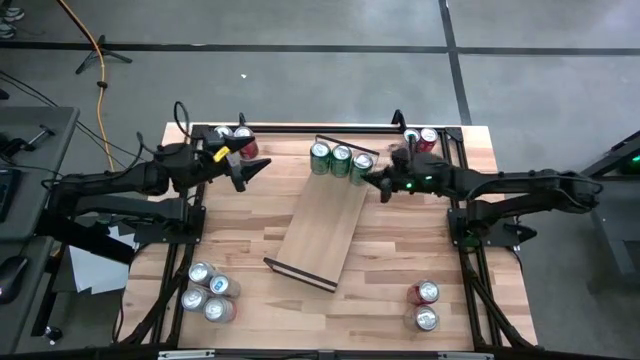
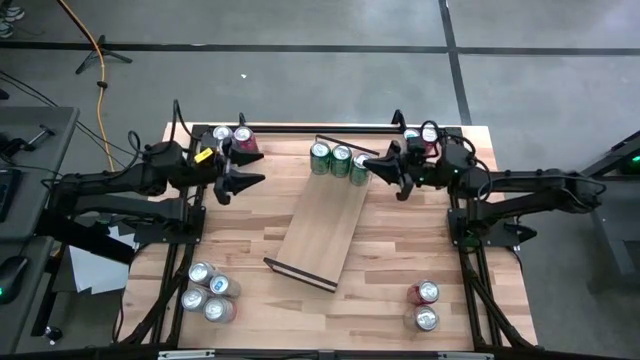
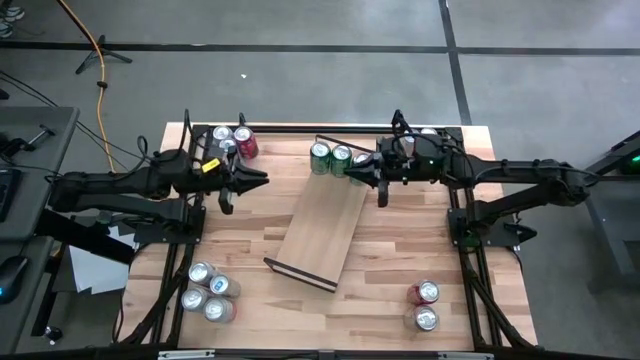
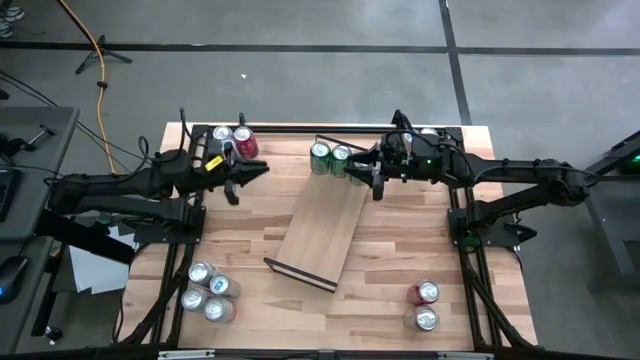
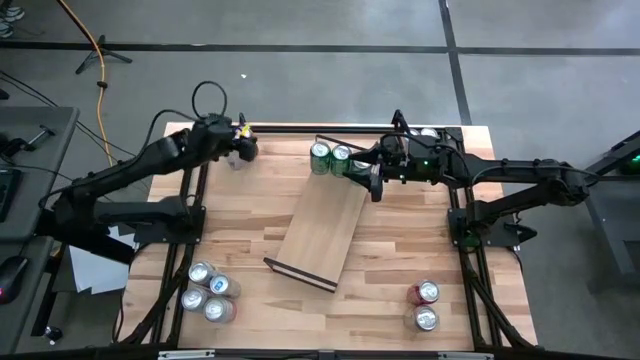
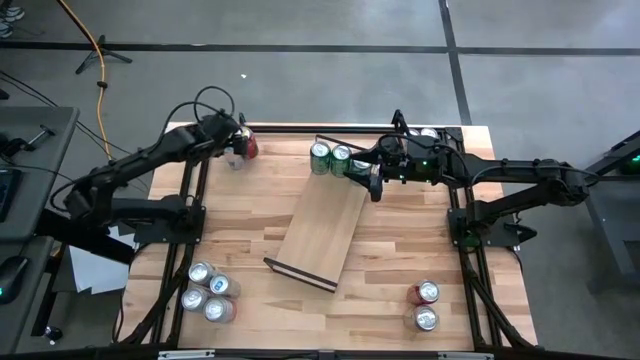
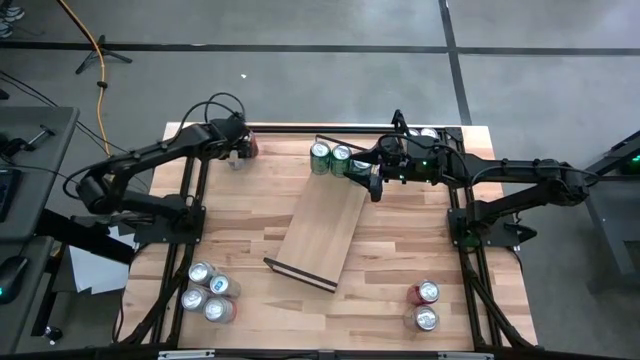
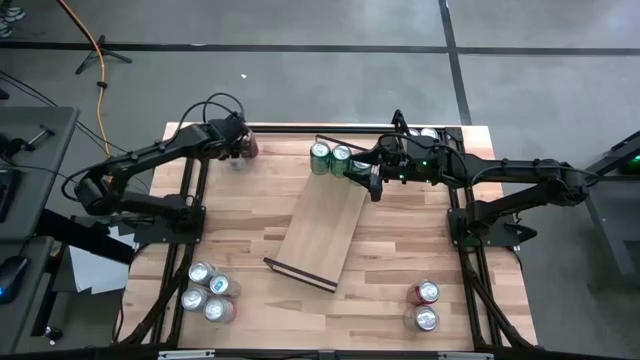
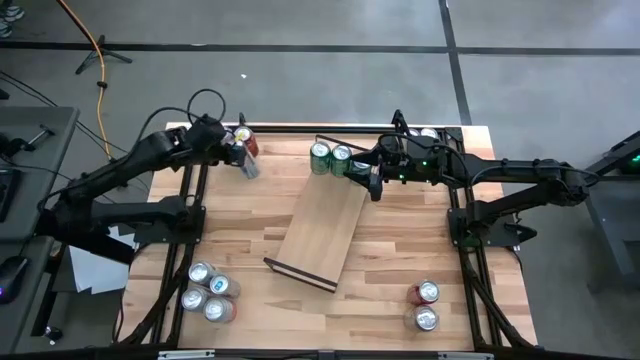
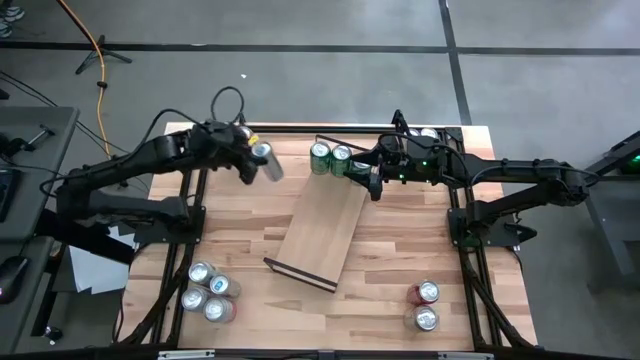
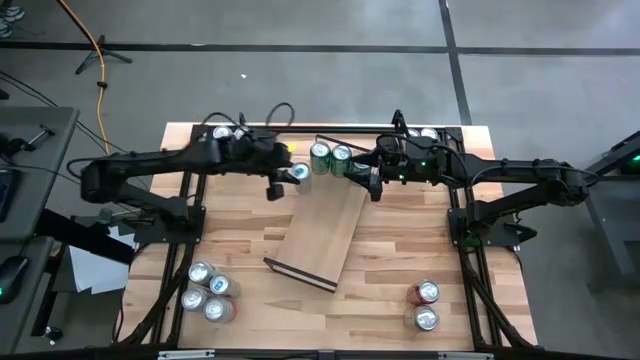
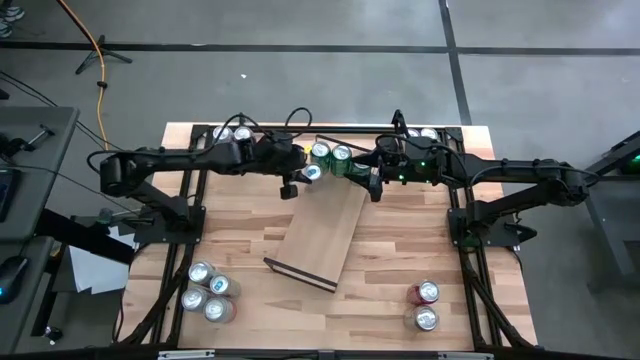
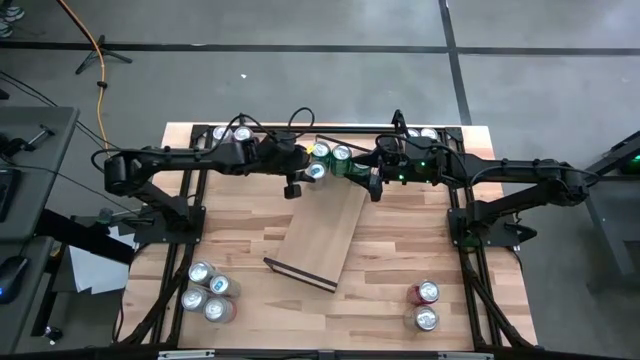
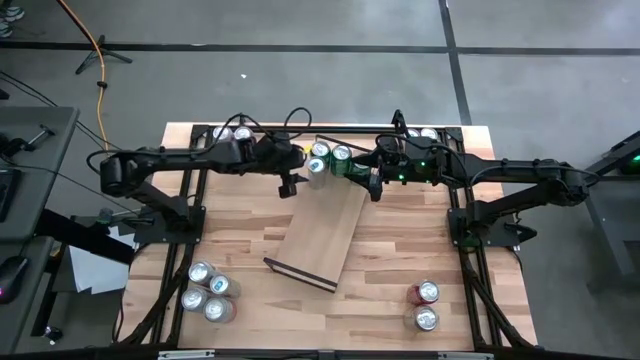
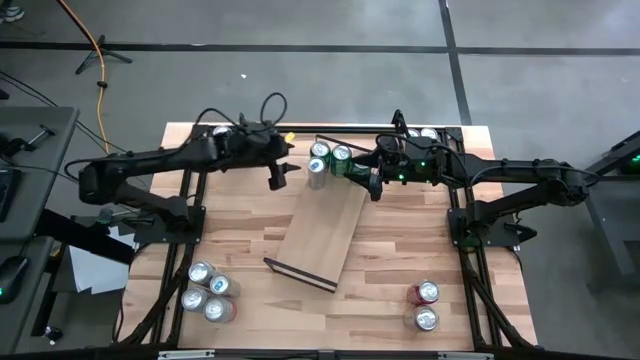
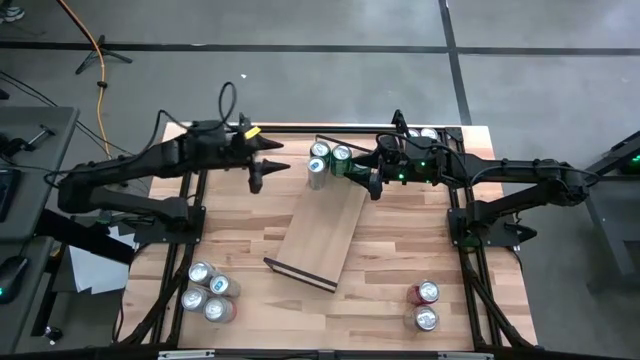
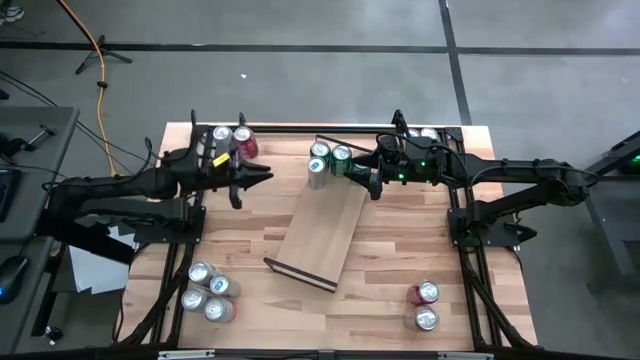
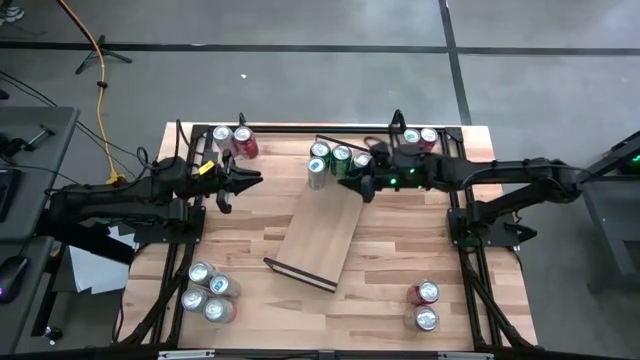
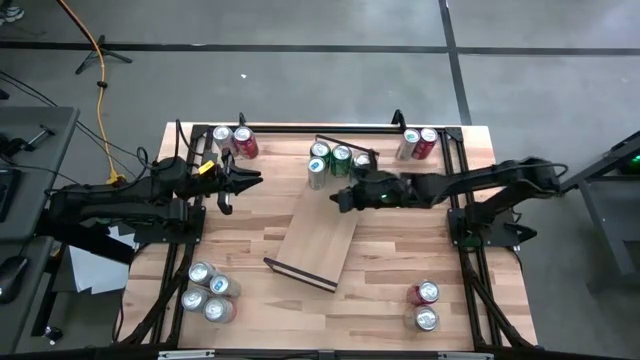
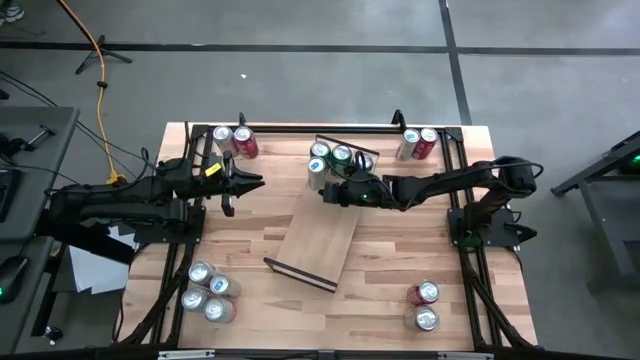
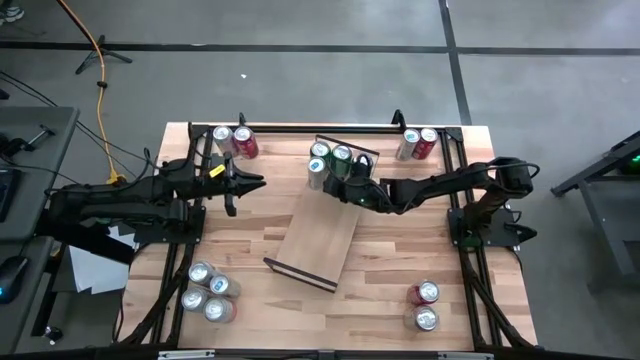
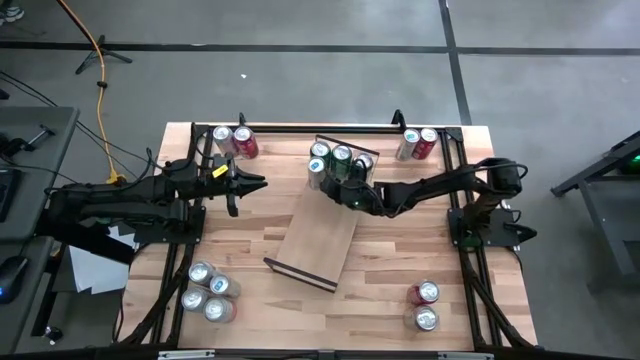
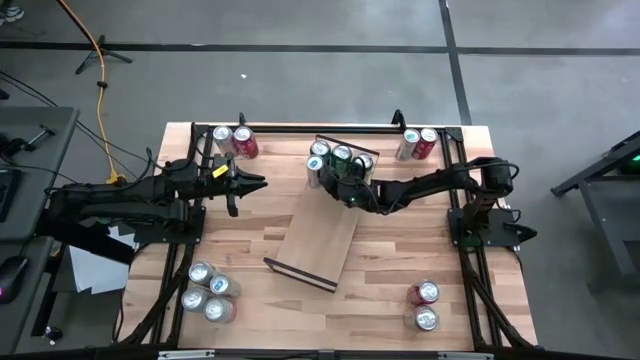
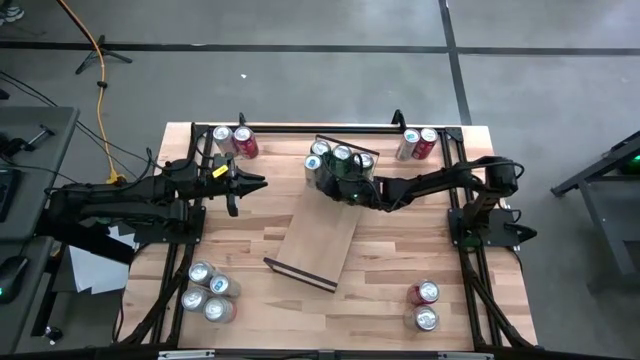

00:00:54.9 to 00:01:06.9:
Task: Place canned beverage on shelf
Put the top left blue soda can on the shelf
